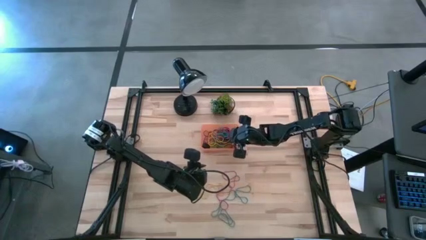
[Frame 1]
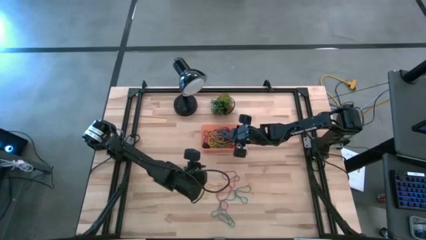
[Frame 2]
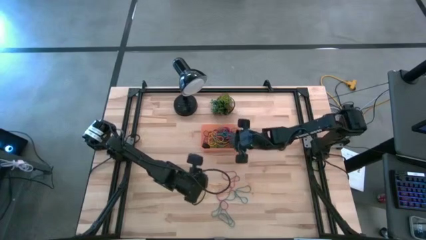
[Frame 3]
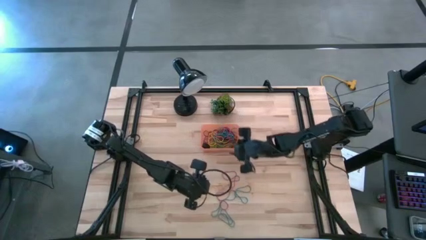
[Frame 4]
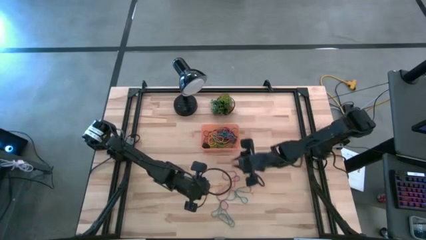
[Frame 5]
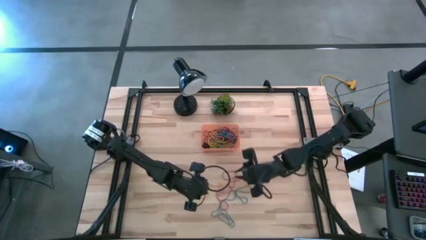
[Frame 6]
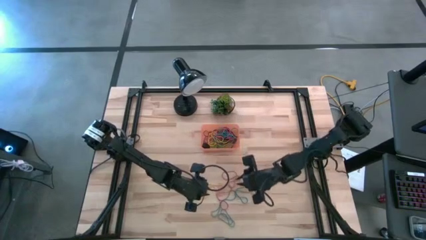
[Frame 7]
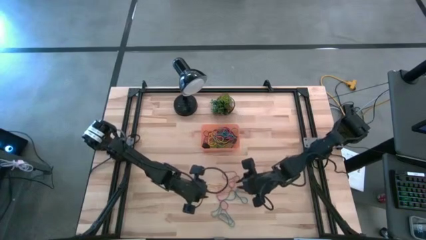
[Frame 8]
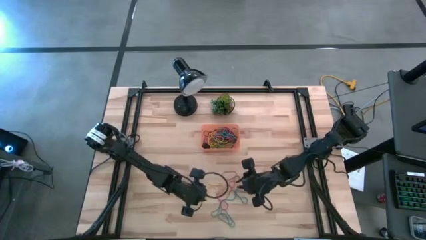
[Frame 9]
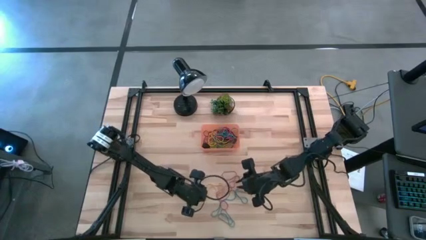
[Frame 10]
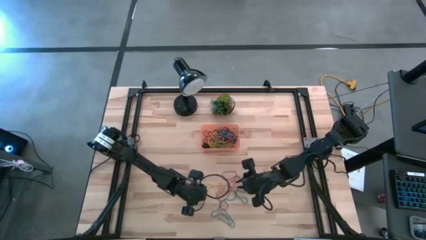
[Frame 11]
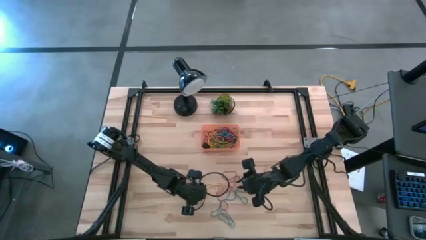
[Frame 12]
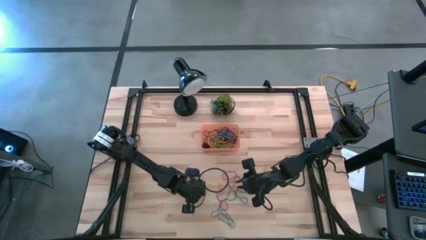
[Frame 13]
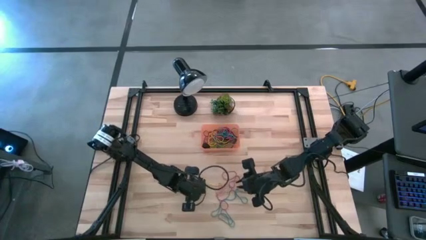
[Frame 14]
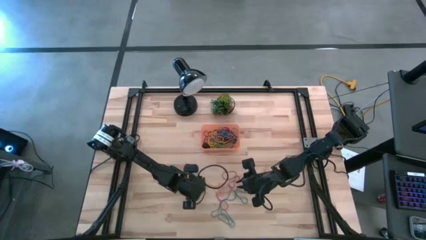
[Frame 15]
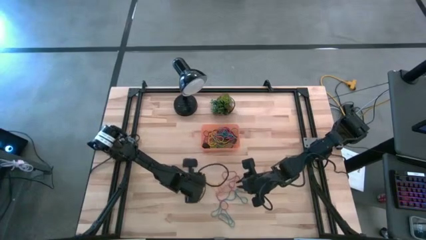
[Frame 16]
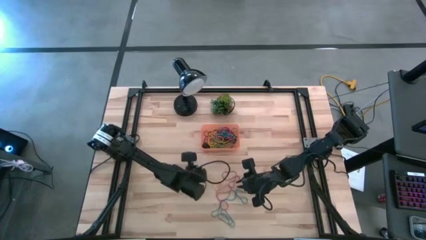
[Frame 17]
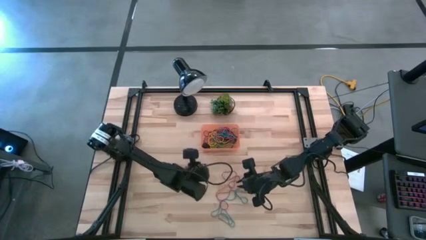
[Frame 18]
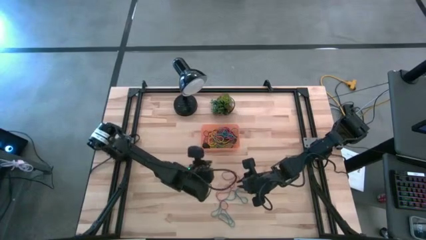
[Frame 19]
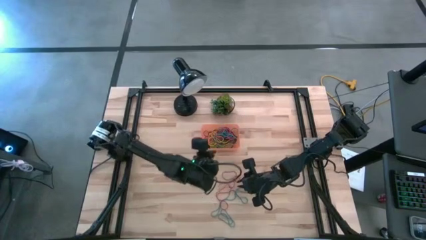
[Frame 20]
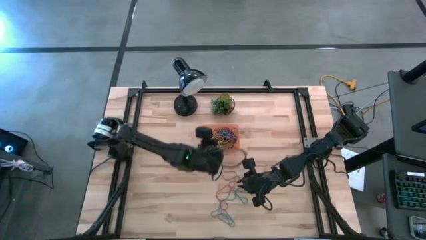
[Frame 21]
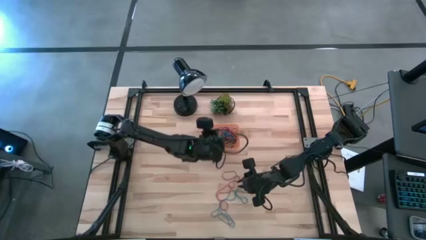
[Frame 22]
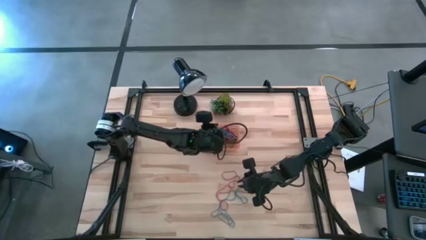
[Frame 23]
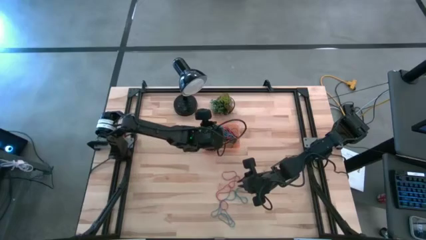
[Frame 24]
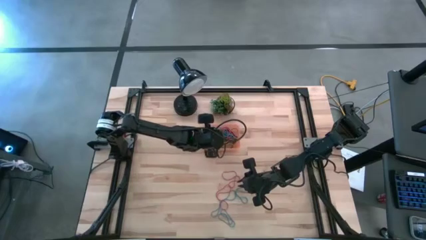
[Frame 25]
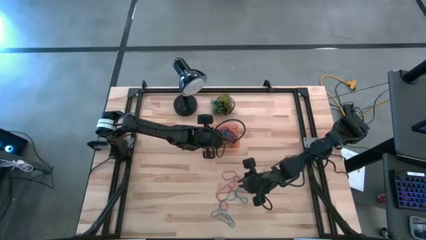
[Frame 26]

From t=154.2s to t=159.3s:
Task: Pick and place rubber bands into bin
Put the yellow rubber band into the orange bin

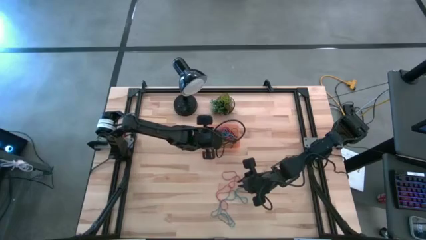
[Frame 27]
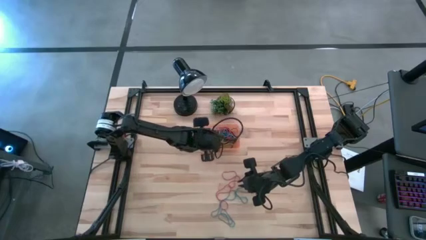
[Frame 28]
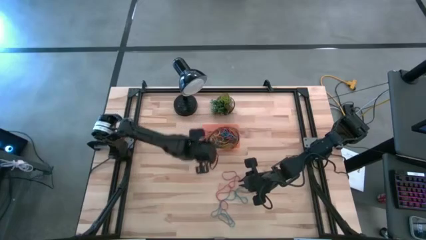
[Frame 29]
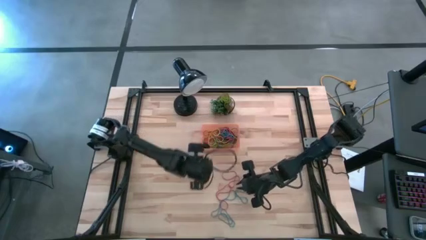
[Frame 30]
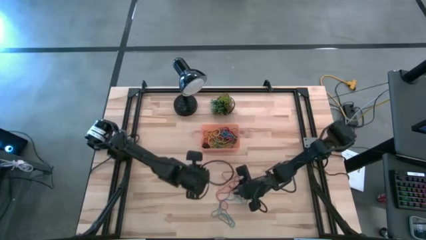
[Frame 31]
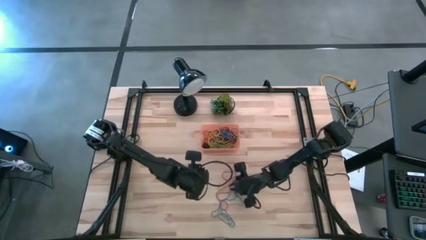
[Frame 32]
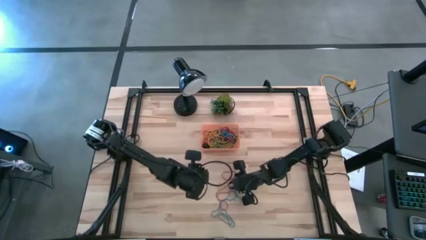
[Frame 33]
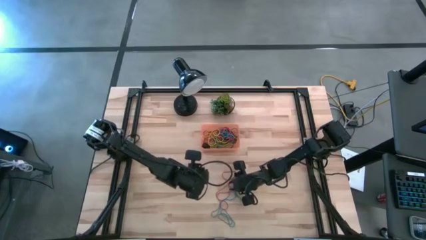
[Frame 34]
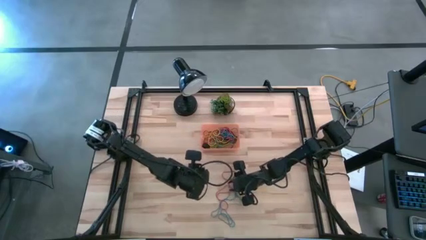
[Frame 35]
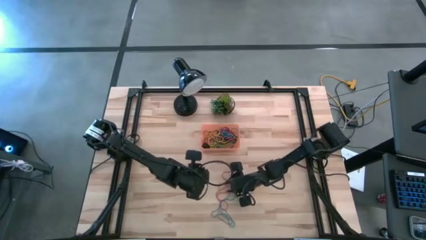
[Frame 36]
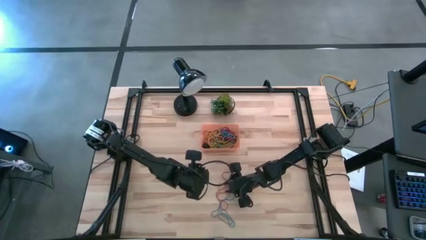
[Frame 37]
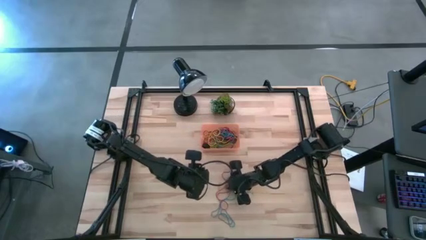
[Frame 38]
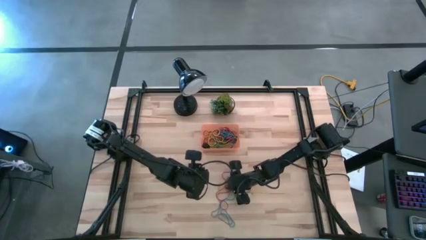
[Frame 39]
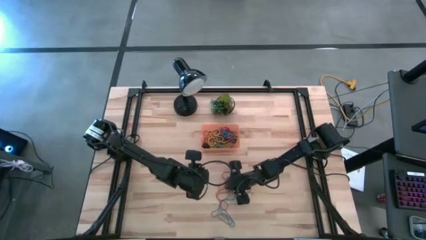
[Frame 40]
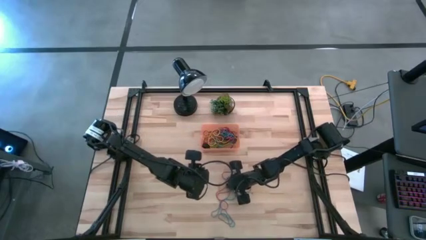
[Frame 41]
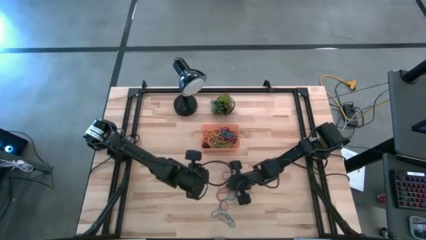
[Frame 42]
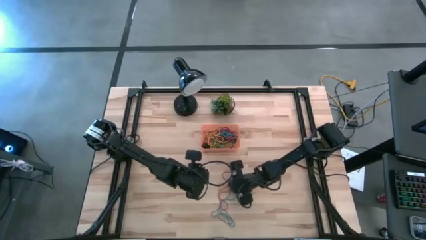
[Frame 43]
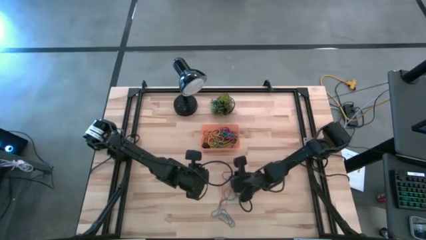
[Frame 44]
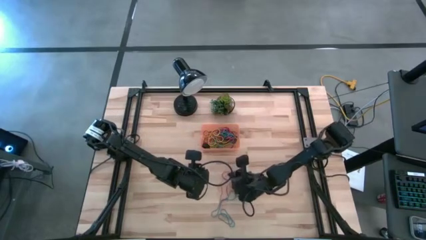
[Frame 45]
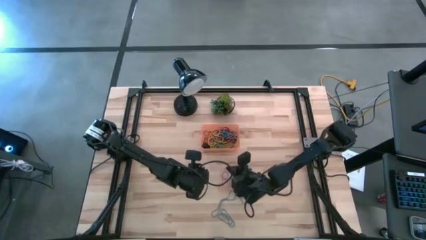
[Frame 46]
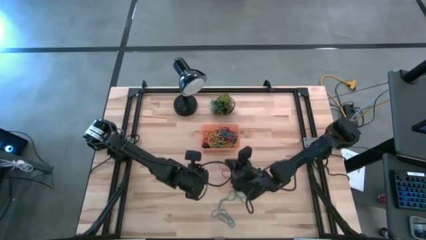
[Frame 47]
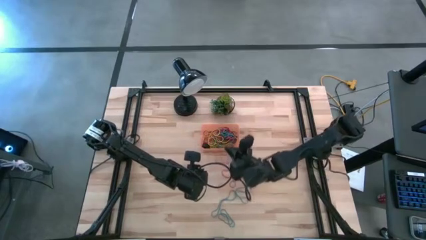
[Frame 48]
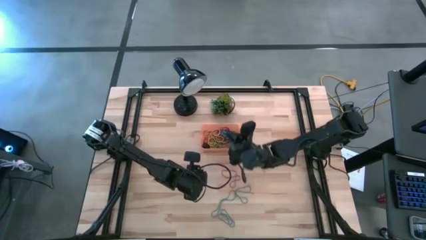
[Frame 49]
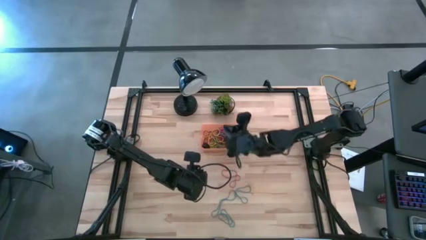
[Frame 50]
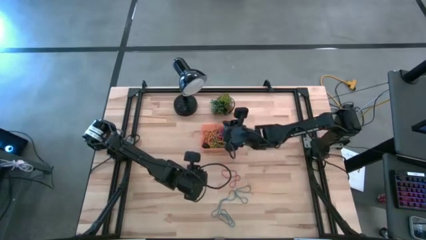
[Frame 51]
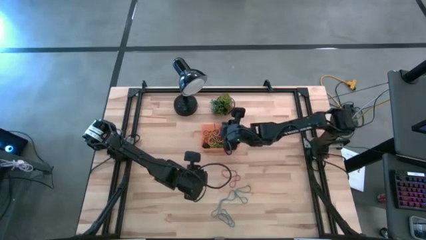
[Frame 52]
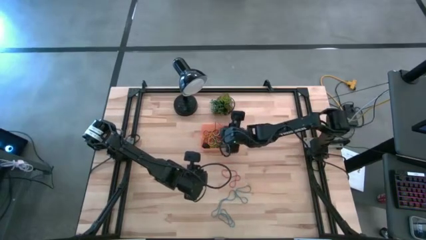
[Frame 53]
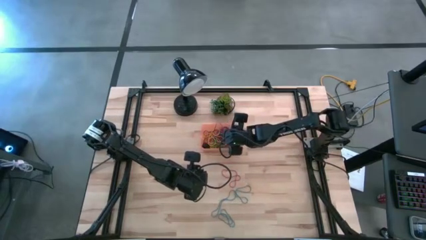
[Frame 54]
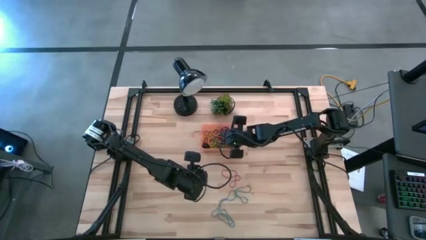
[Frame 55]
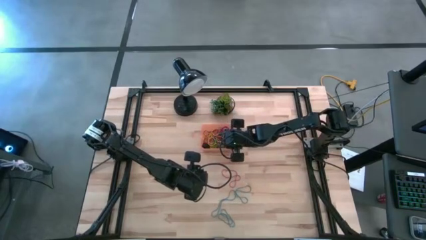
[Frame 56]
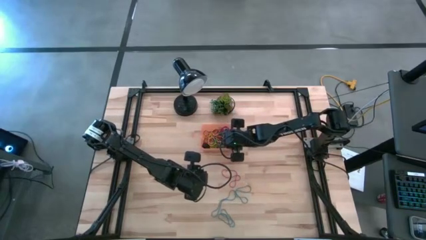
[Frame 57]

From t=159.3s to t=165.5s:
Put the red rubber band into the orange bin

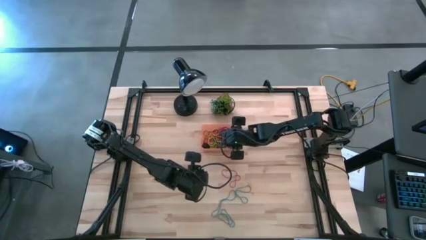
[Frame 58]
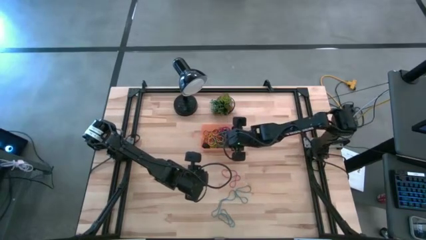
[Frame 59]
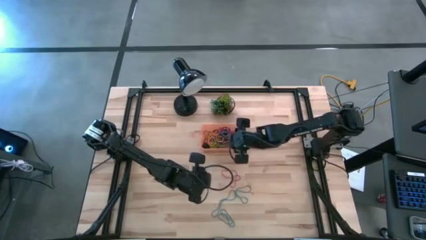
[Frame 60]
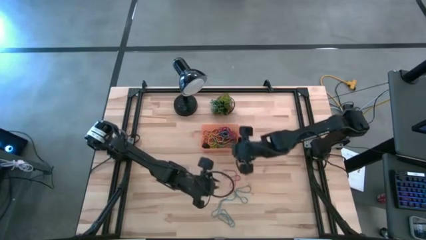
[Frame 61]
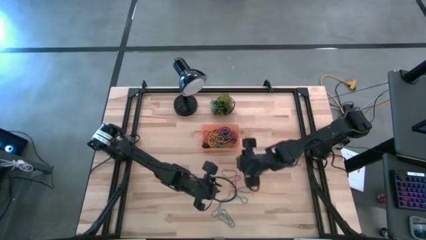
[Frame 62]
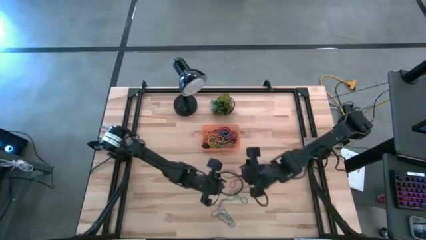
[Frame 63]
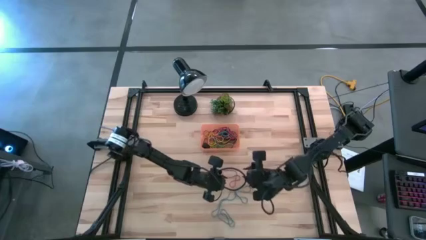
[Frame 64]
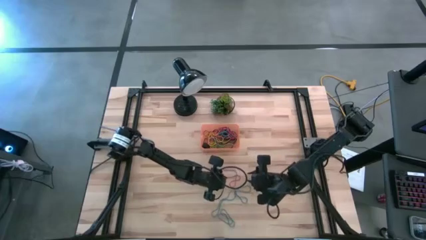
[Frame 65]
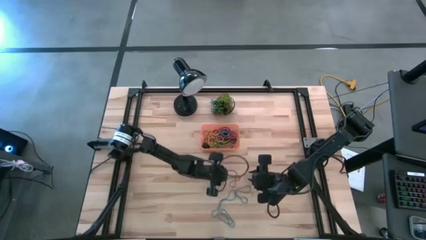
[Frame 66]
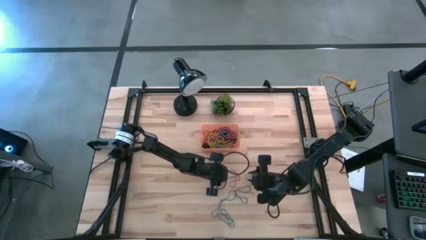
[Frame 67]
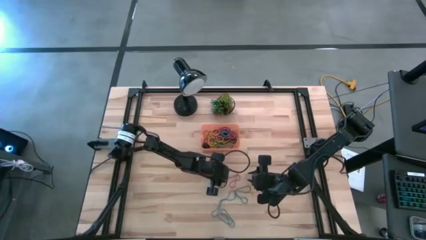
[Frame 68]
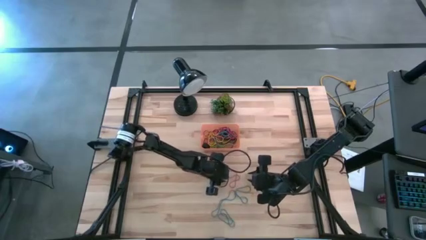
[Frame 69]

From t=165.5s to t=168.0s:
Put the red rubber band into the orange bin

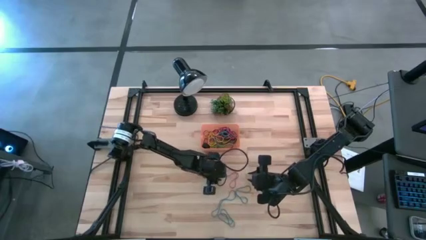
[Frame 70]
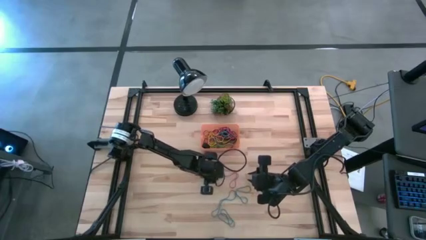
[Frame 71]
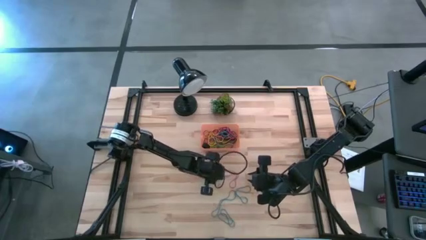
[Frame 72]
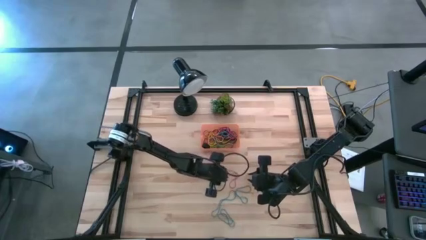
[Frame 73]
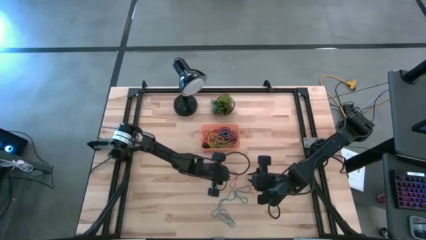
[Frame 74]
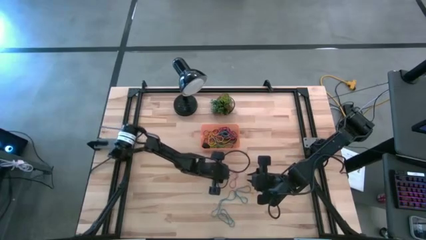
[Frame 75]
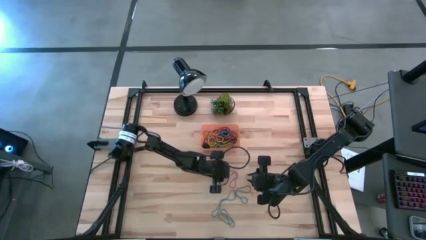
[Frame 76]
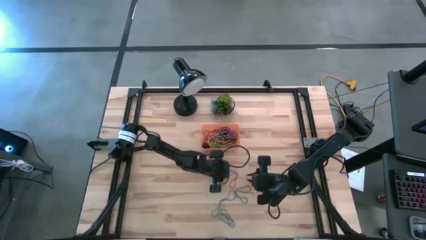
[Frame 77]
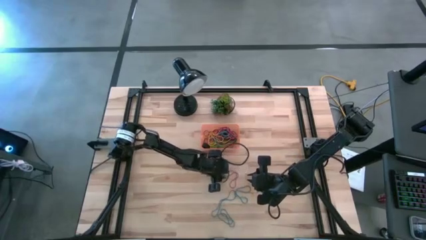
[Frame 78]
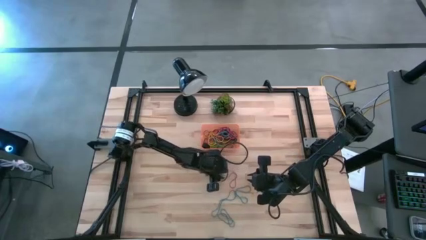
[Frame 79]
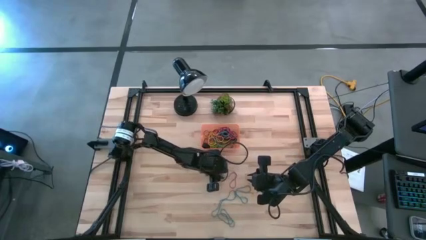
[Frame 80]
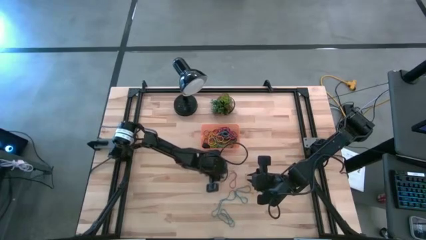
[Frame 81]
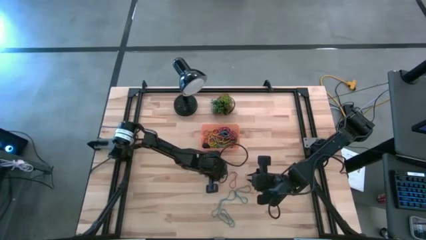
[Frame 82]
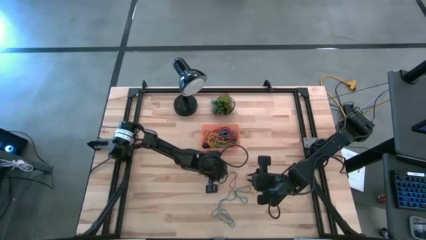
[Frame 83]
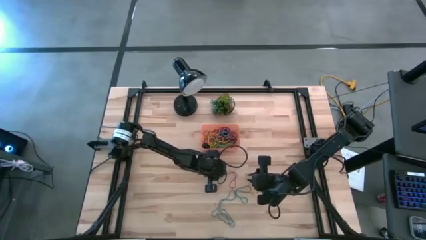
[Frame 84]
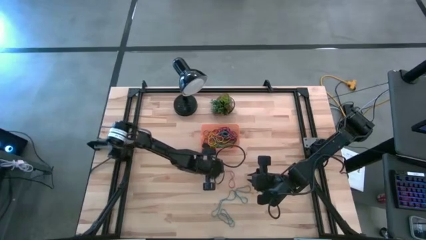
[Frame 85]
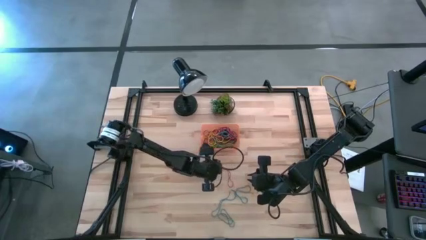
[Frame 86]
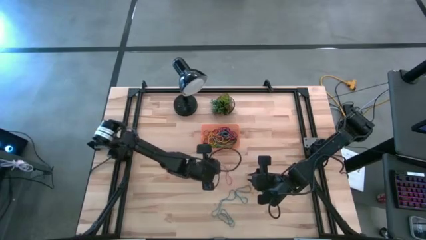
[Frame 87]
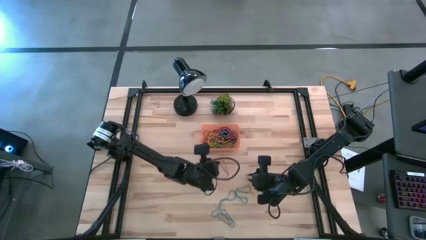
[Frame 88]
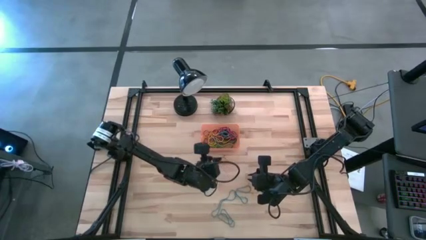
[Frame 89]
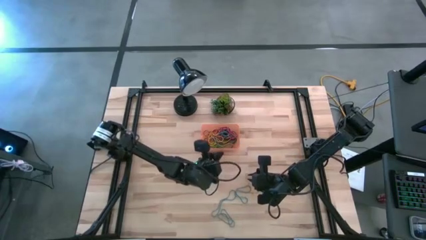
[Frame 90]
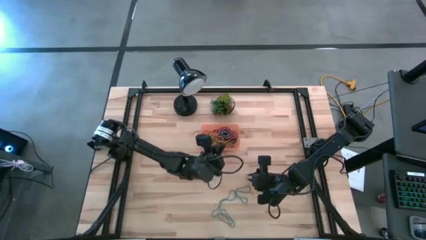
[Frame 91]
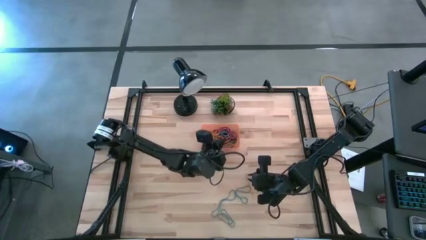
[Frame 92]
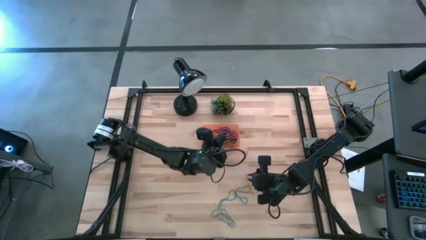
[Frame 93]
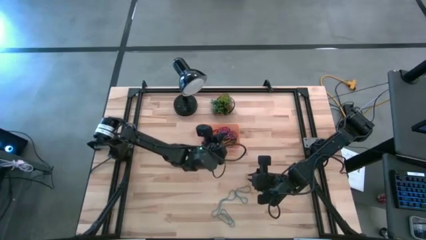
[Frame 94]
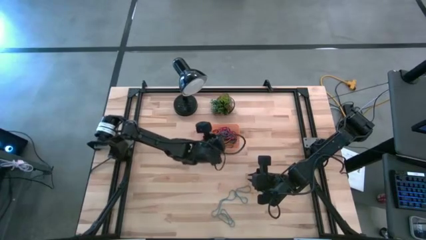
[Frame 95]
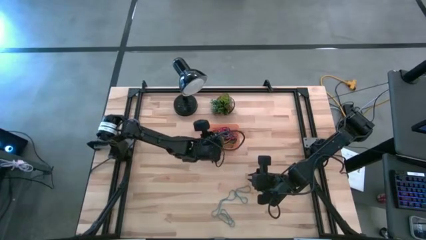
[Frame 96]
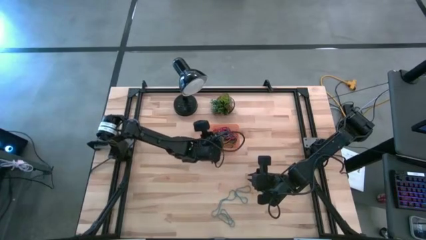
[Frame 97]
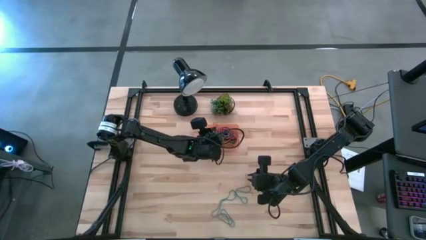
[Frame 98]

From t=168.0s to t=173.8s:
Put the red rubber band into the orange bin
